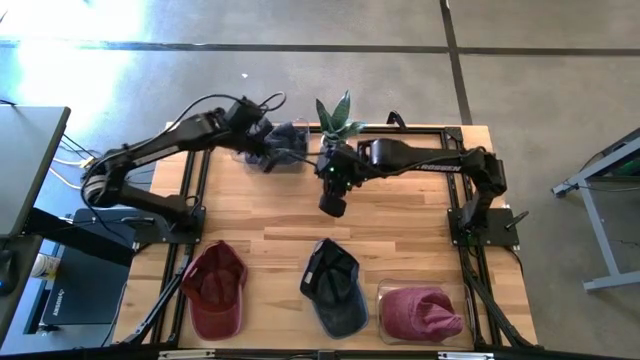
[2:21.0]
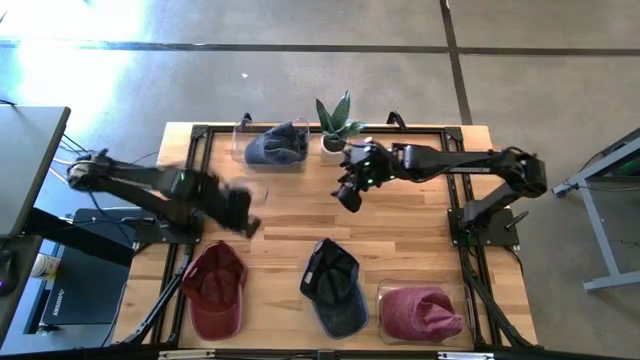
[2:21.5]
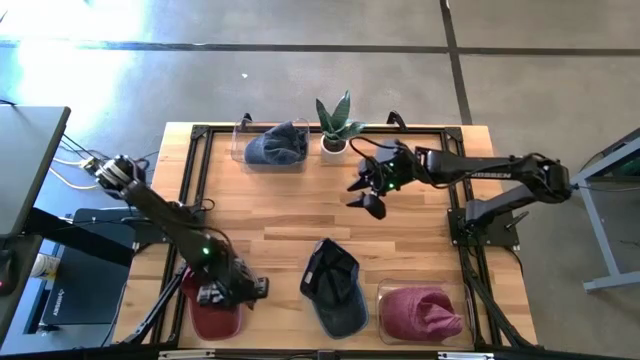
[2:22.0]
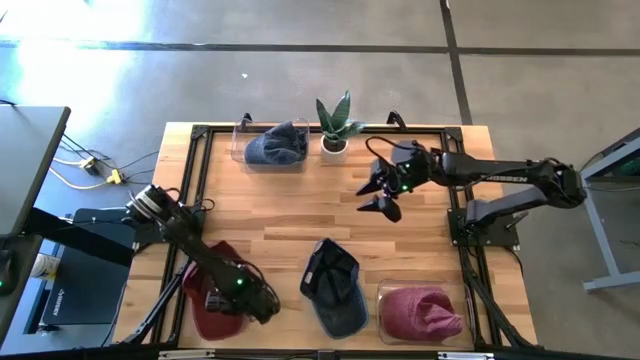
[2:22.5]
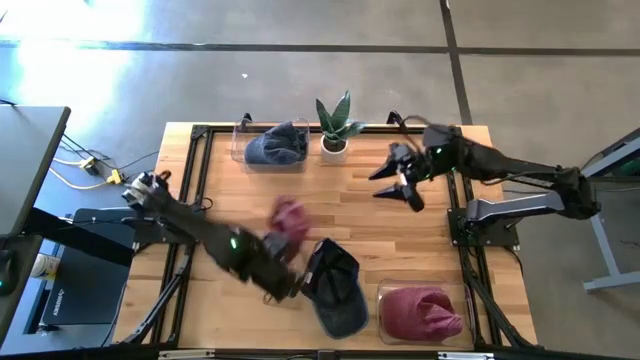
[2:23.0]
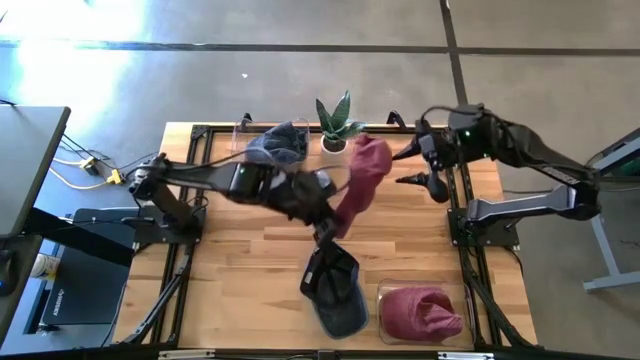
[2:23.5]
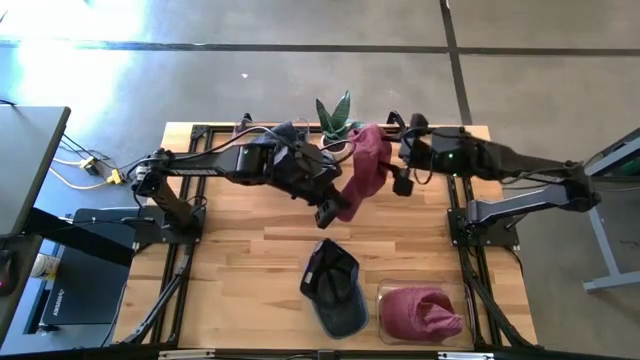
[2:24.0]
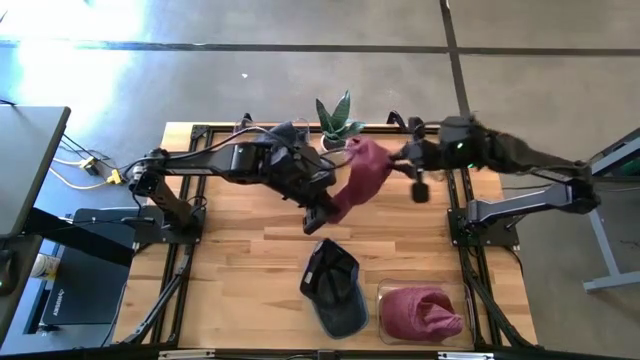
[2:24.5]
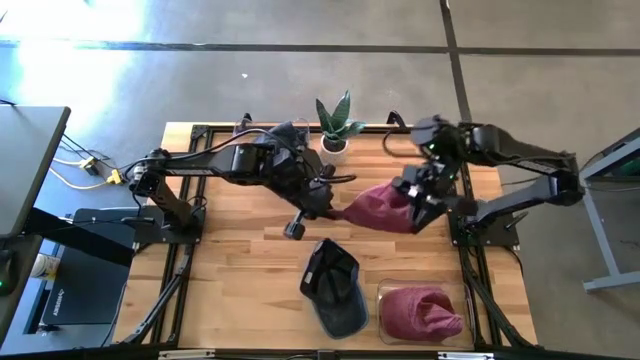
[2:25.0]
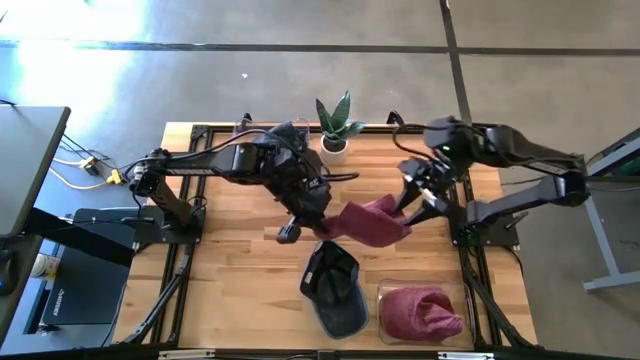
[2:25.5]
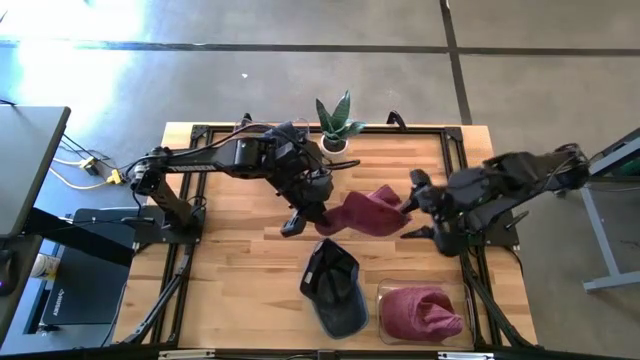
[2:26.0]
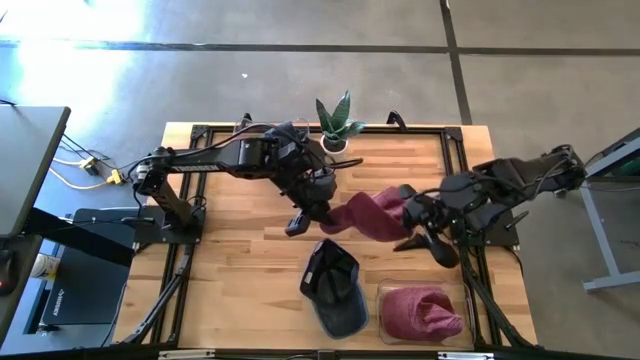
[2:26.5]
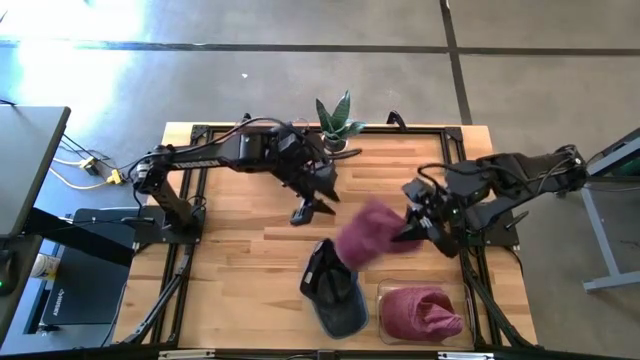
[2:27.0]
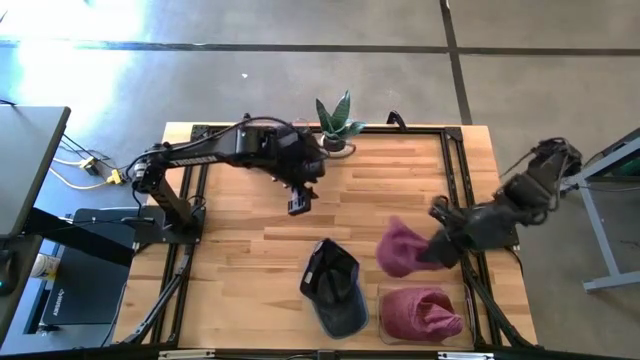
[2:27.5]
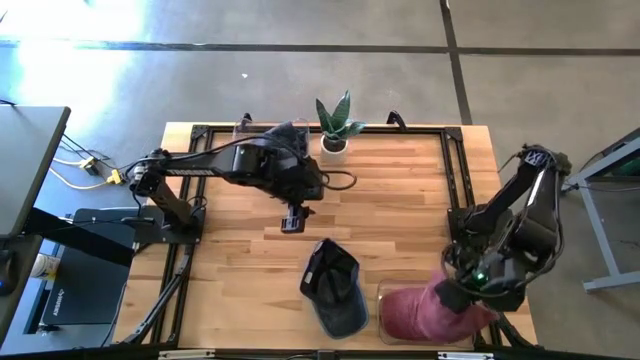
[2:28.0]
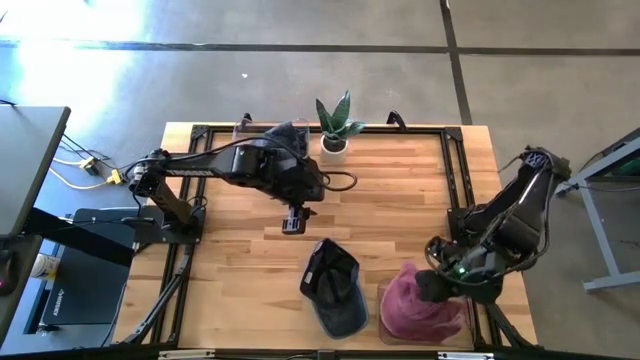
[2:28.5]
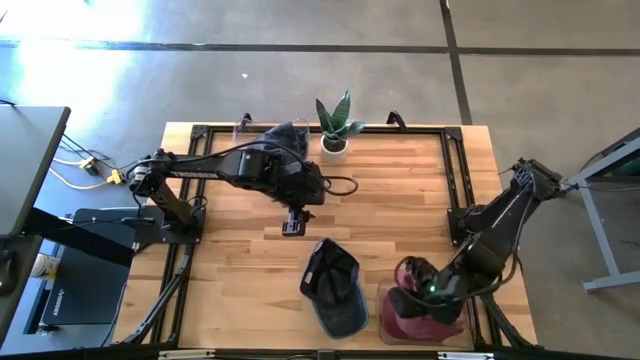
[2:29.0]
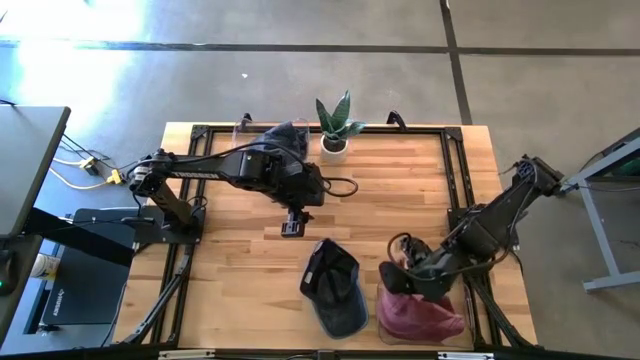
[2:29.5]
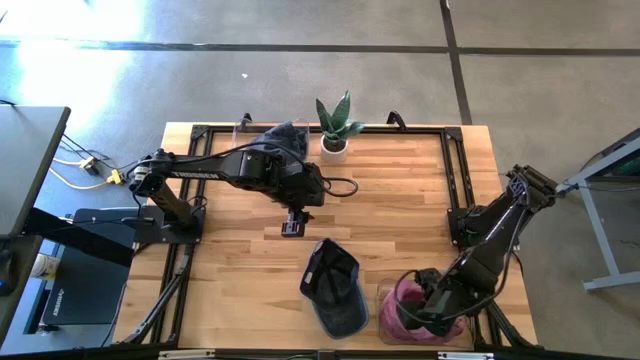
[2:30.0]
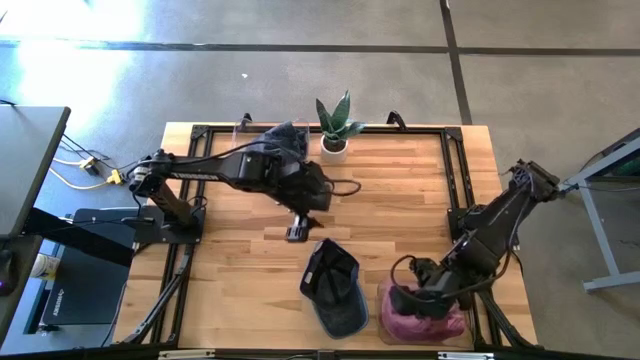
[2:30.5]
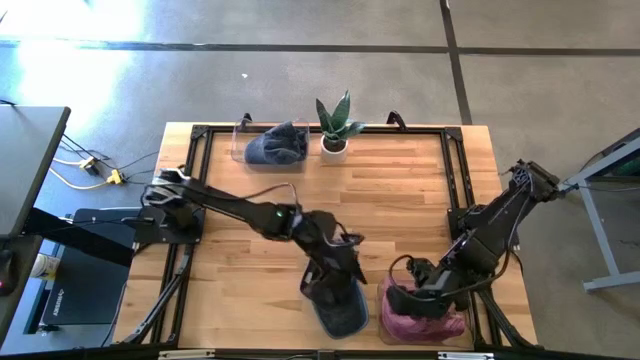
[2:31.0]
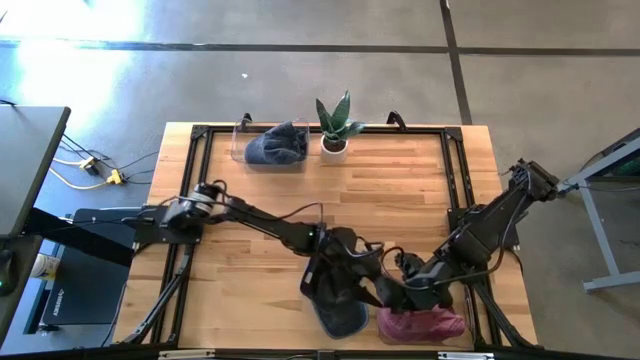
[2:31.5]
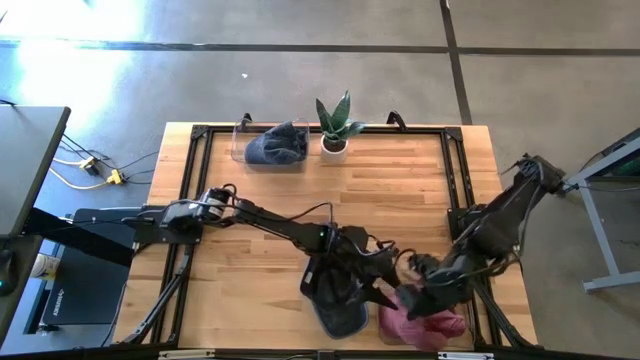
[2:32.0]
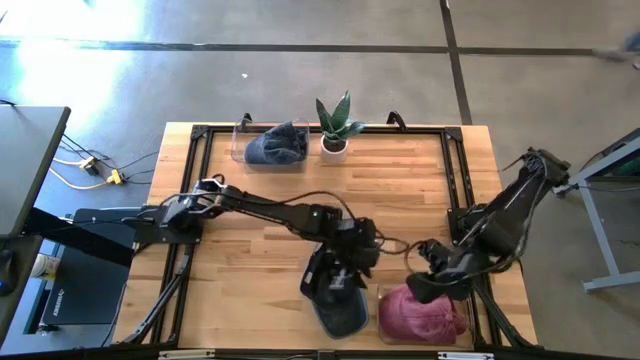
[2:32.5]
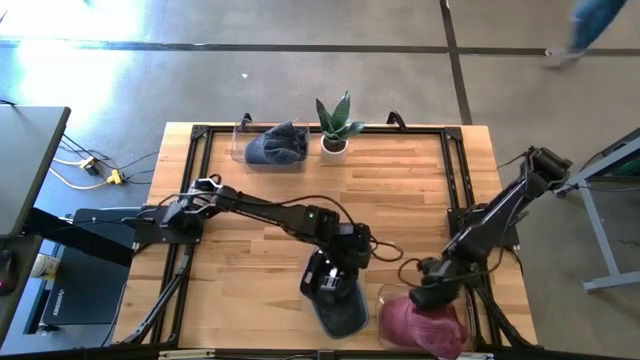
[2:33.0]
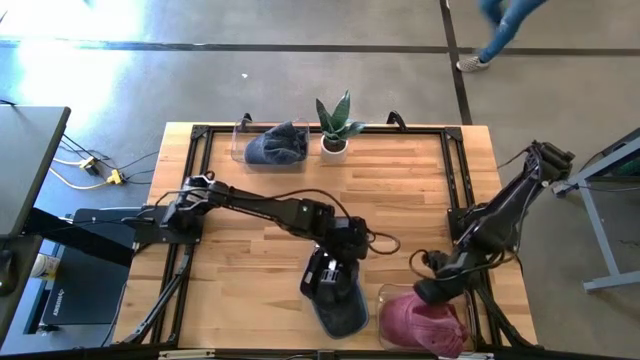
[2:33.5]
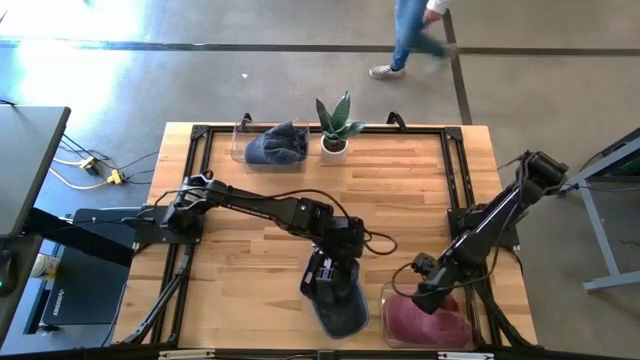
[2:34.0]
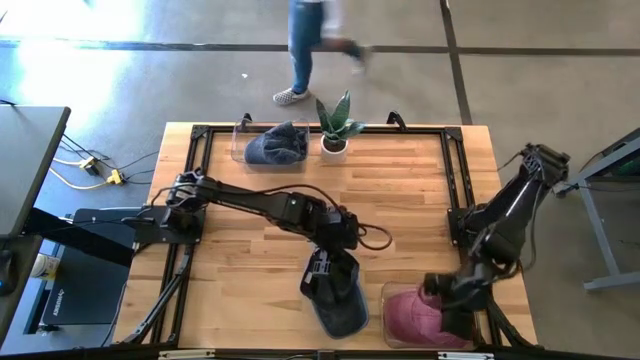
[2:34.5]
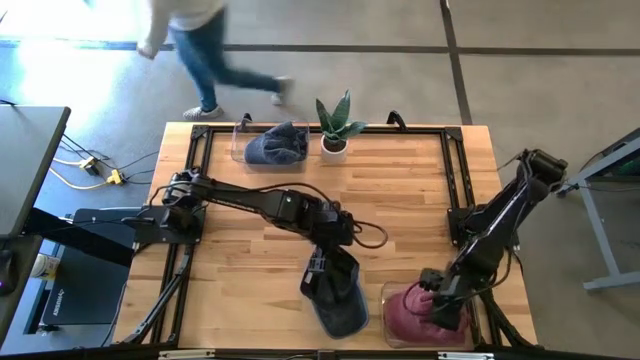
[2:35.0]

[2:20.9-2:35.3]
Task: Pick & Place hat
Put the red cap into the bottom transparent bin

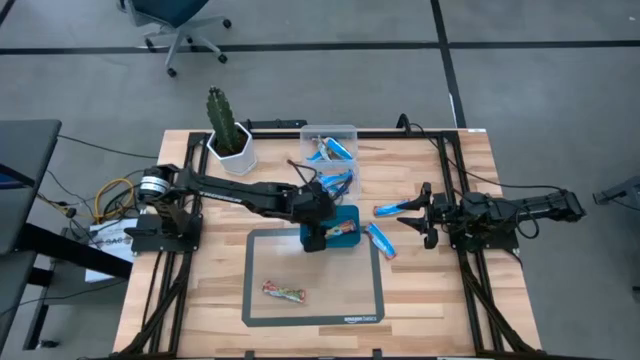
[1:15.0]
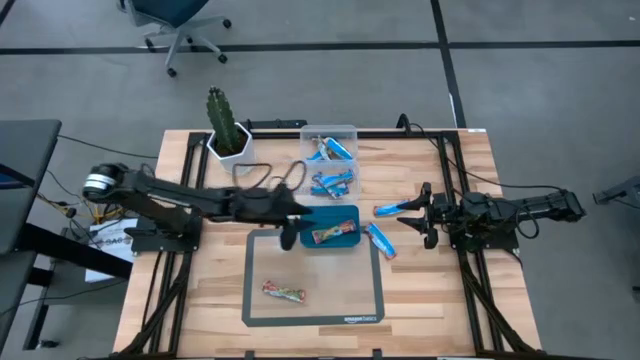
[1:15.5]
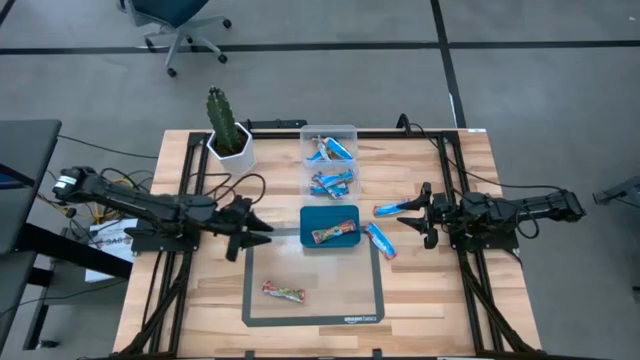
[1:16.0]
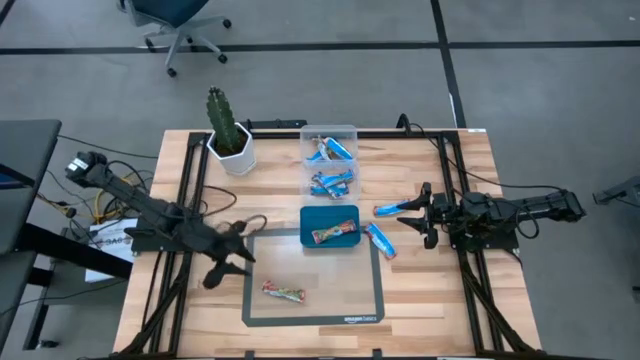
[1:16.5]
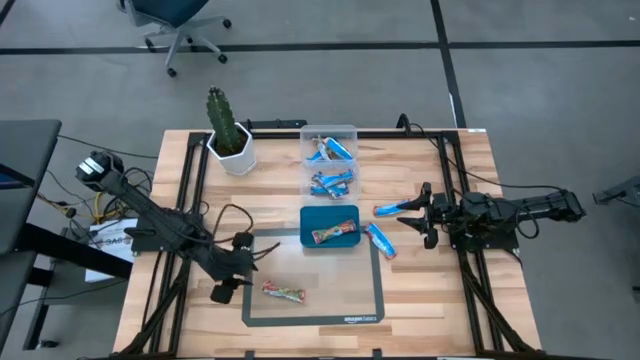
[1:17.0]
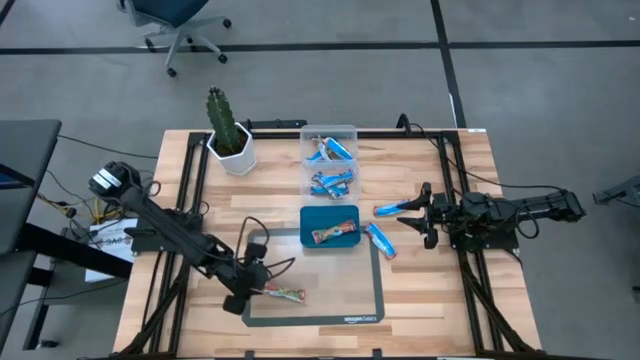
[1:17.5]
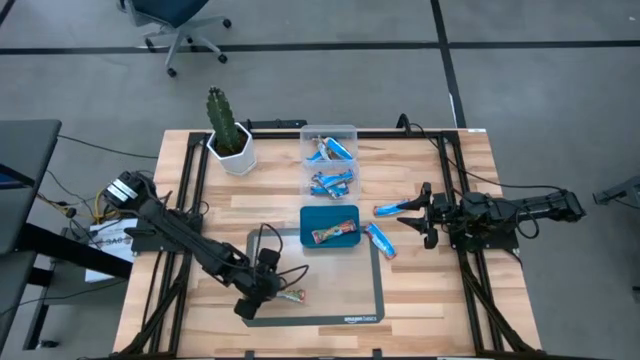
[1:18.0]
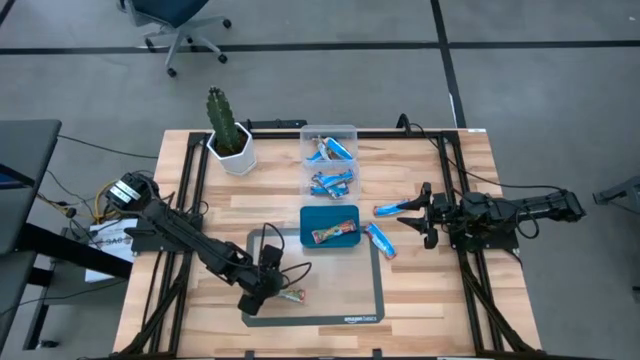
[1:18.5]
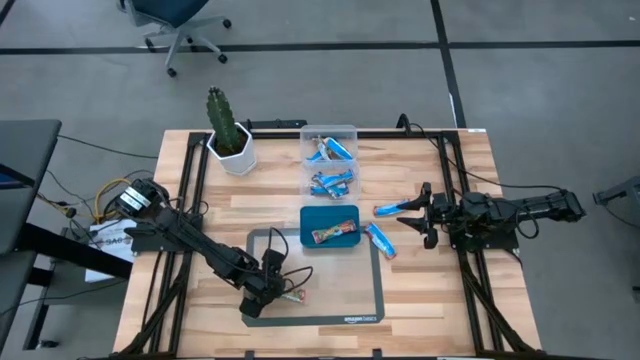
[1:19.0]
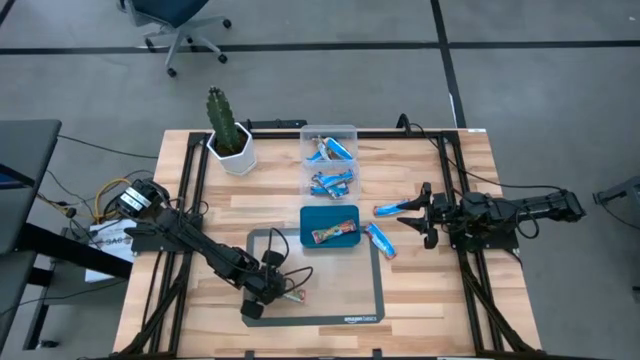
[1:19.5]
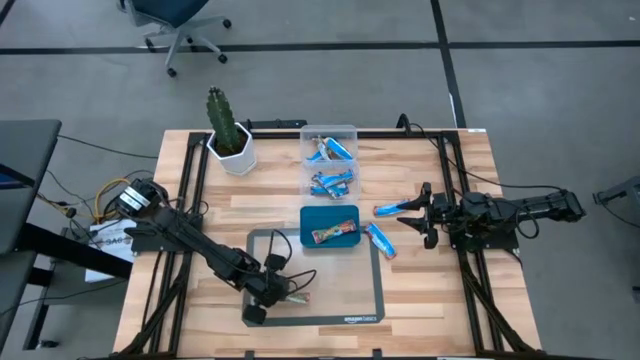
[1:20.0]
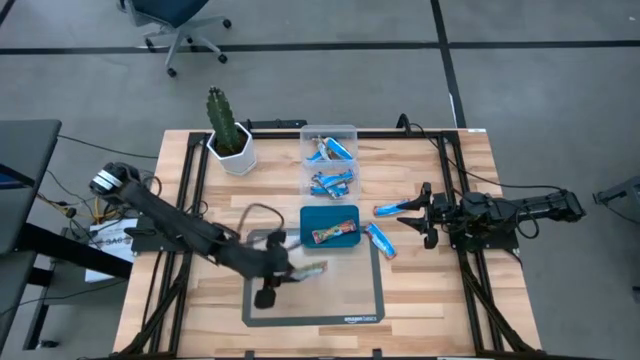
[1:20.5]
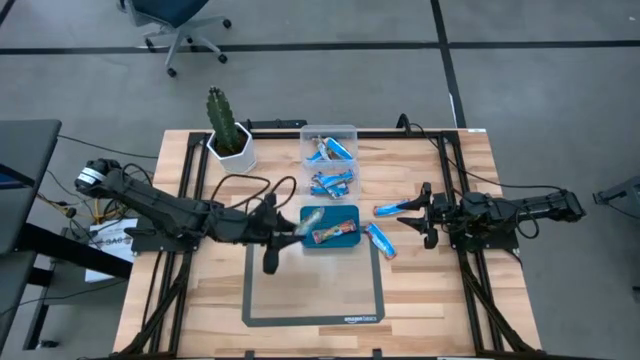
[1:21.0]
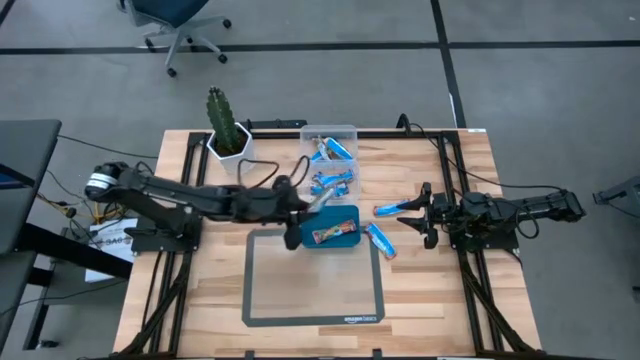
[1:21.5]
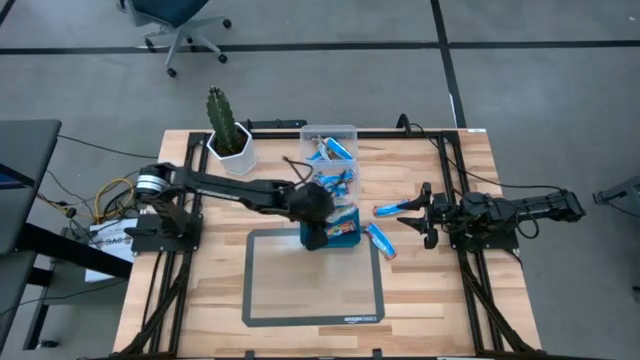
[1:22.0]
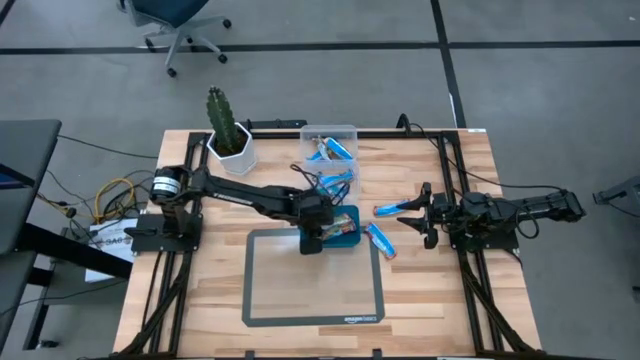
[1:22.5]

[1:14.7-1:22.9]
Task: Pick and place Granola Bars by type
Put the red granola bar into the blue bin
